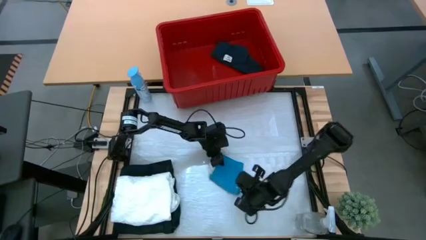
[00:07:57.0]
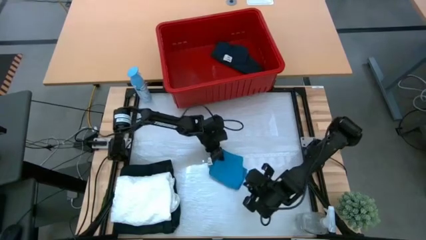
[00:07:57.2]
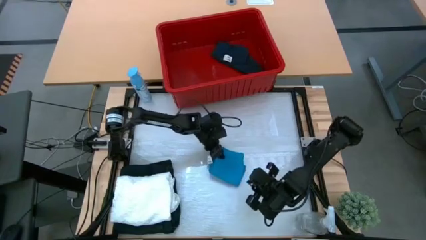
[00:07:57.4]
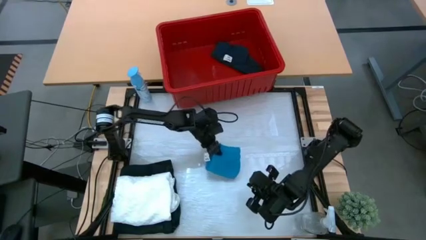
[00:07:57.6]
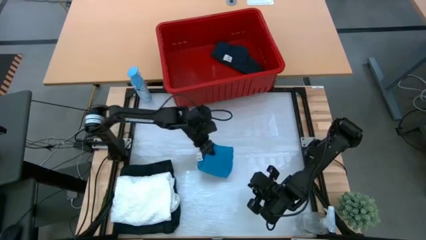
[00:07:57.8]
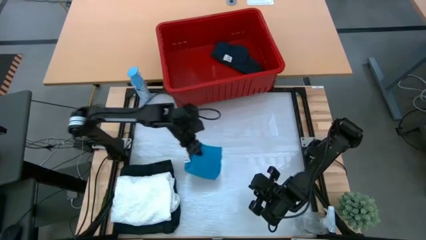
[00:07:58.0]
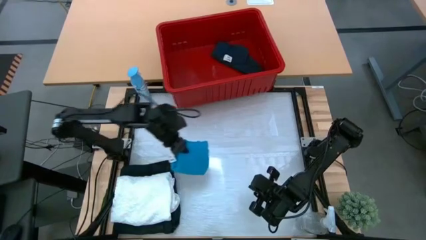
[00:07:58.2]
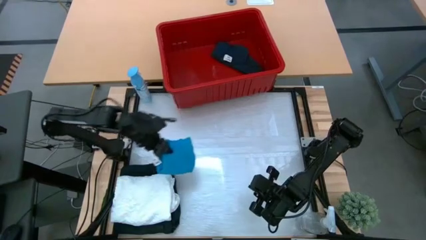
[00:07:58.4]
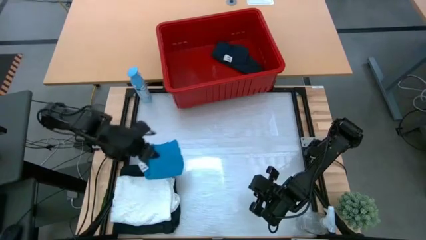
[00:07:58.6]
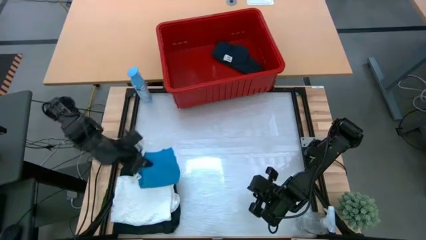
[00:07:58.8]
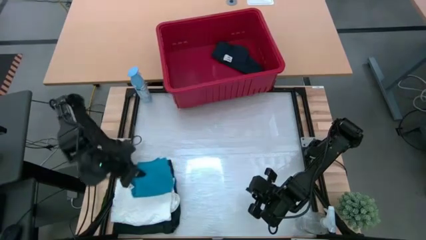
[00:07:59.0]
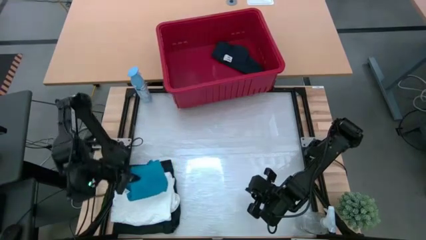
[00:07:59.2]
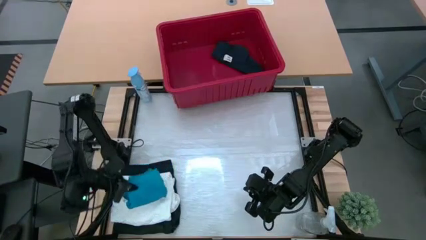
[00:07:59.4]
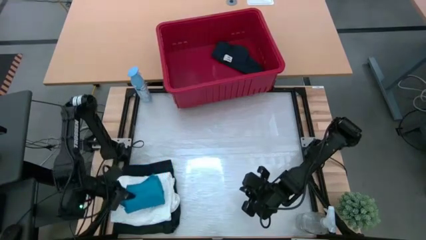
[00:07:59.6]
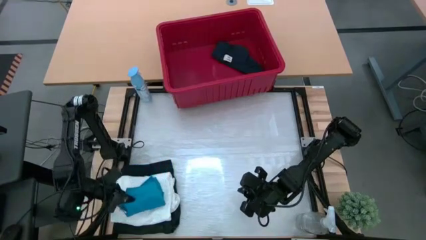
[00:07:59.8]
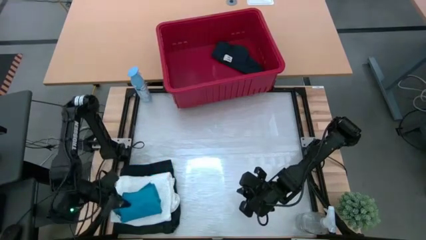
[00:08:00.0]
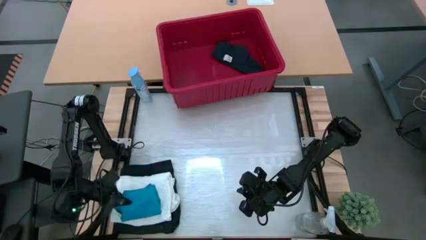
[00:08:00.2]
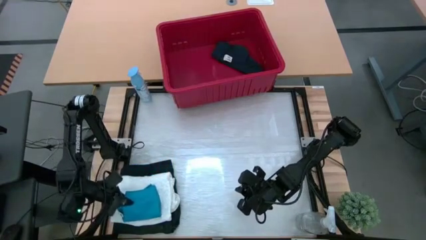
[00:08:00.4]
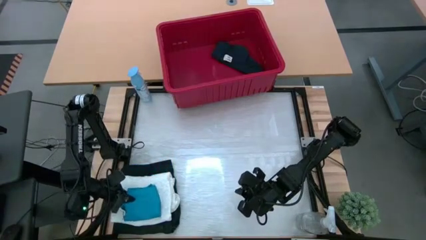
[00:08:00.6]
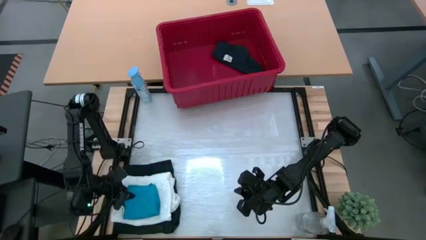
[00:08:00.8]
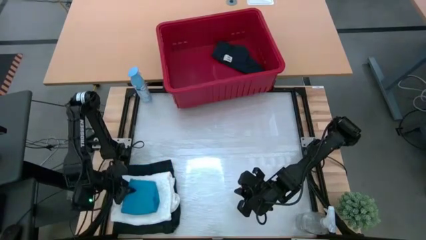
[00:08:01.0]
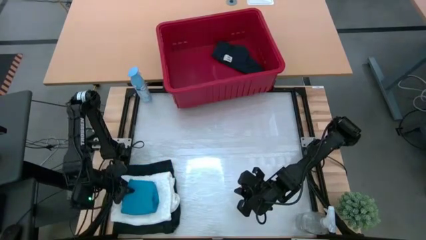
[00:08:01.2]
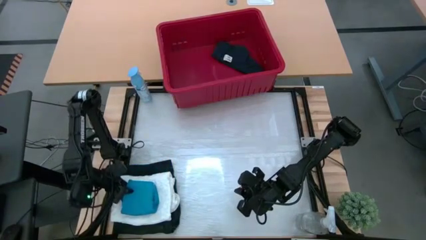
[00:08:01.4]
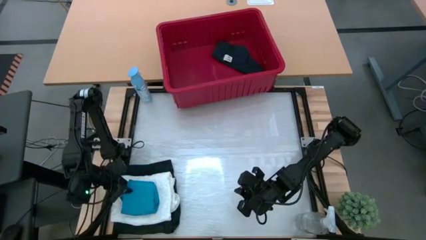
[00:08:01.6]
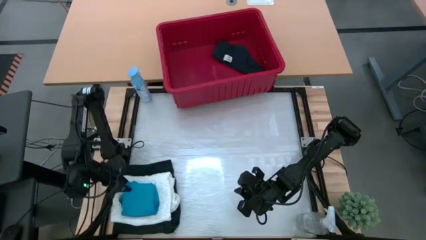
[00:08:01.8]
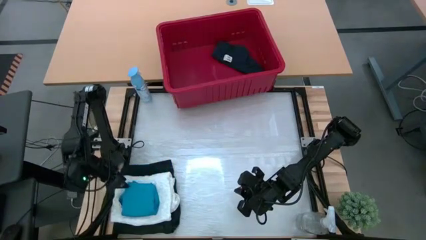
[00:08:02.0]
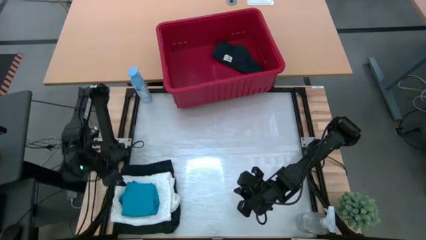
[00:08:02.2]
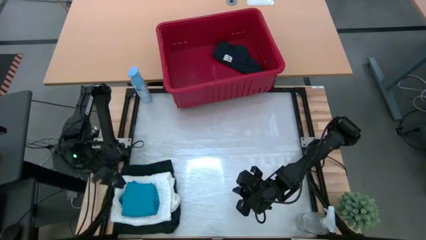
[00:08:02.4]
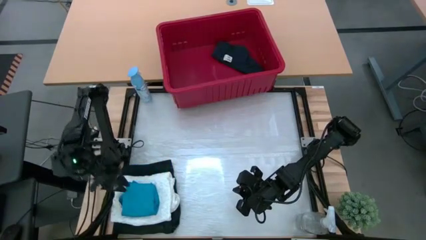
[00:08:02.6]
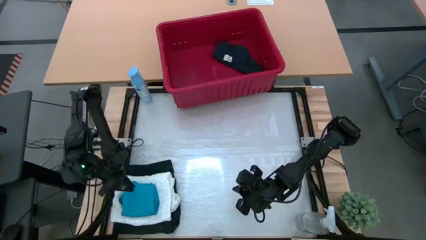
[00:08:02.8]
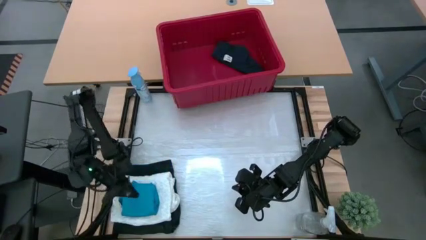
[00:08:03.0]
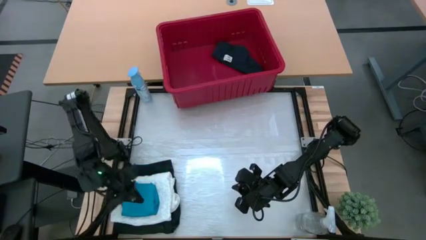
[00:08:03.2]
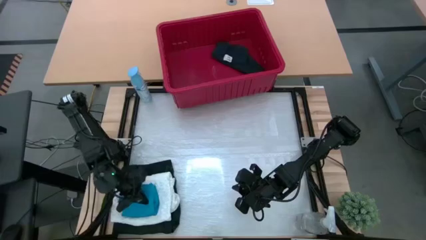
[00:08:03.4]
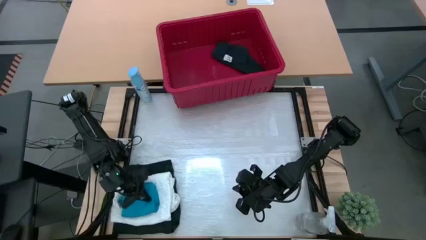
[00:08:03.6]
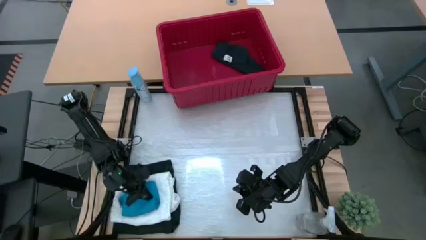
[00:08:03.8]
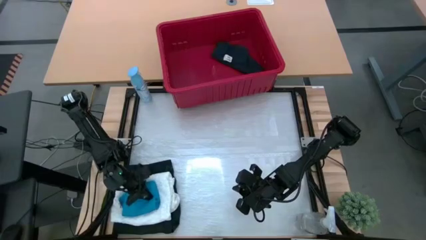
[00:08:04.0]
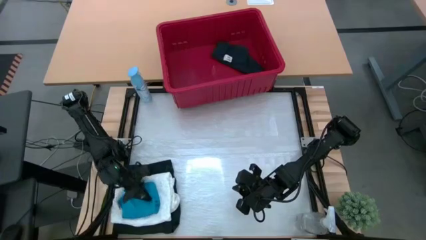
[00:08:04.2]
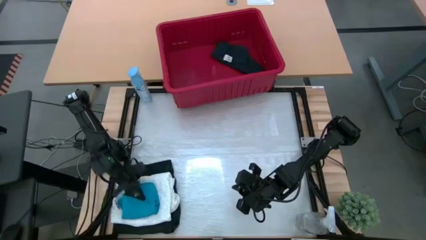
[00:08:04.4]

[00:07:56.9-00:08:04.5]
Task: Fold Laundry from Bin
Stack the blue shorts on top of the white shirt

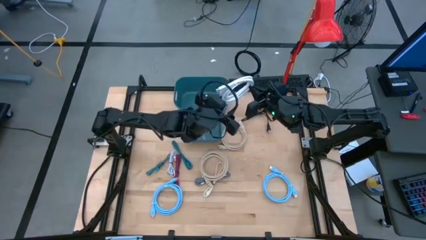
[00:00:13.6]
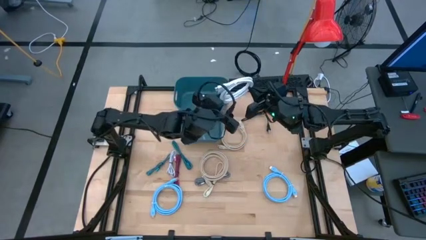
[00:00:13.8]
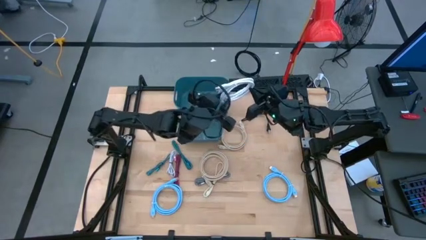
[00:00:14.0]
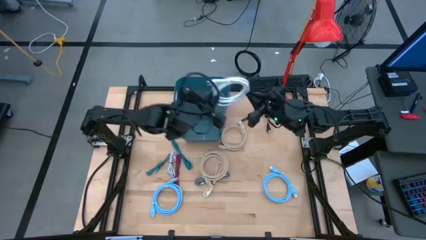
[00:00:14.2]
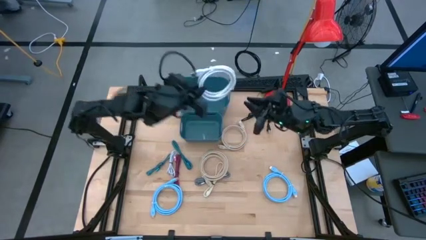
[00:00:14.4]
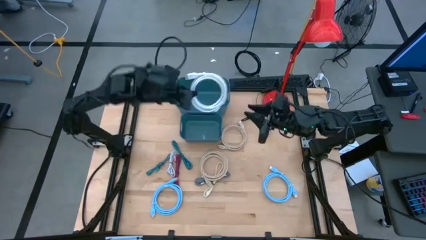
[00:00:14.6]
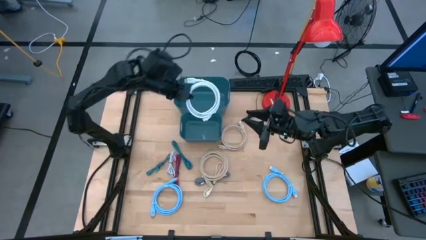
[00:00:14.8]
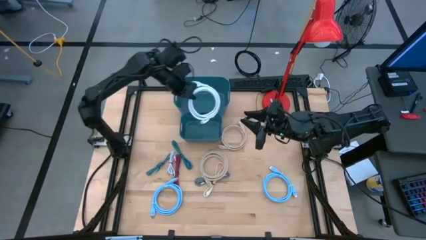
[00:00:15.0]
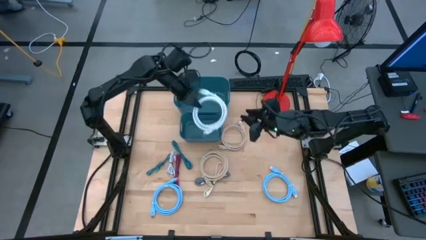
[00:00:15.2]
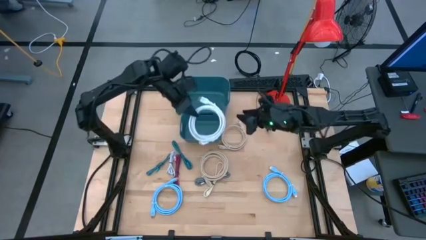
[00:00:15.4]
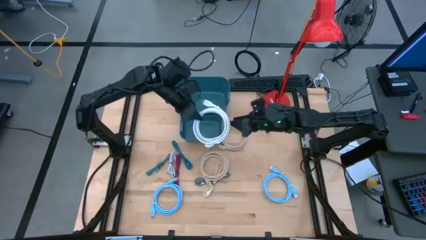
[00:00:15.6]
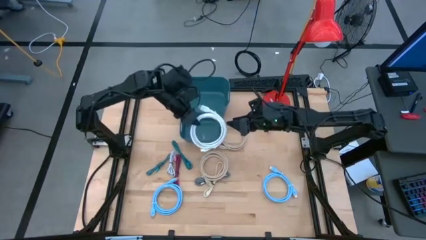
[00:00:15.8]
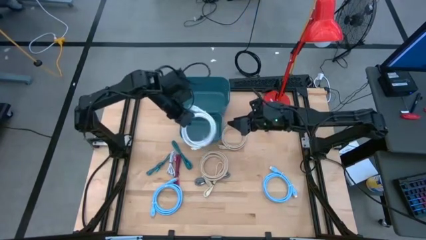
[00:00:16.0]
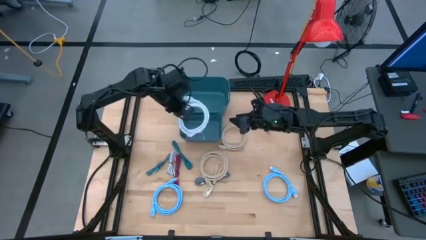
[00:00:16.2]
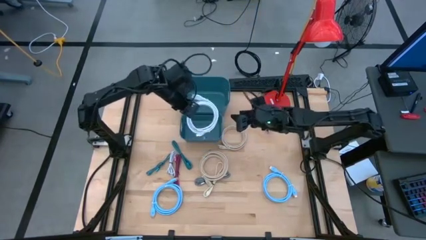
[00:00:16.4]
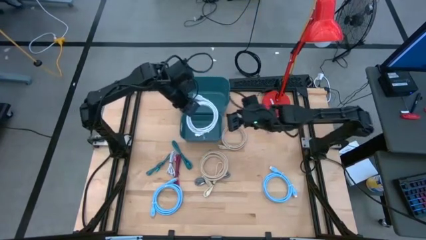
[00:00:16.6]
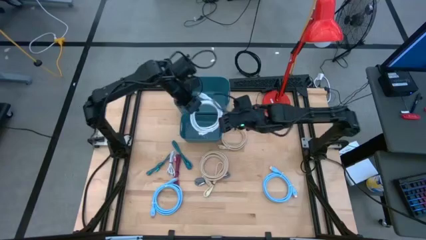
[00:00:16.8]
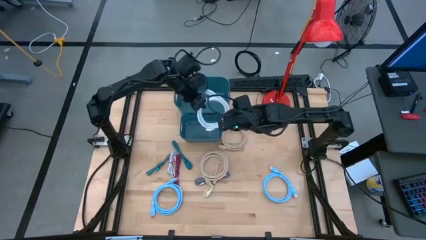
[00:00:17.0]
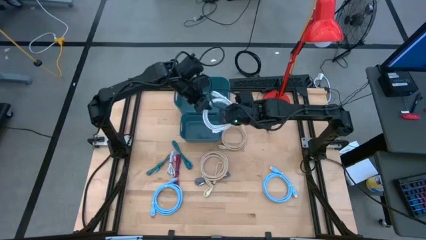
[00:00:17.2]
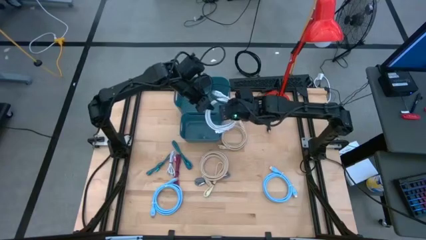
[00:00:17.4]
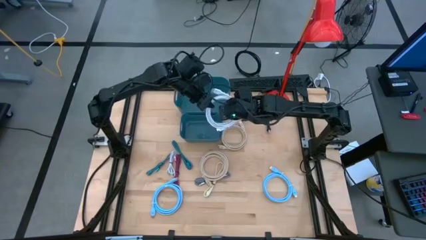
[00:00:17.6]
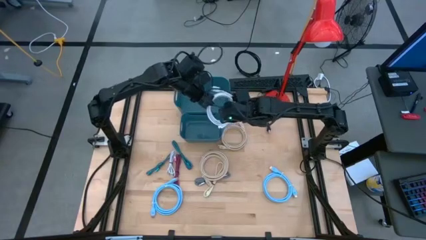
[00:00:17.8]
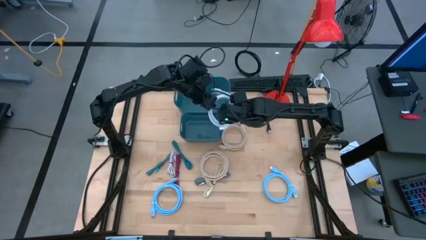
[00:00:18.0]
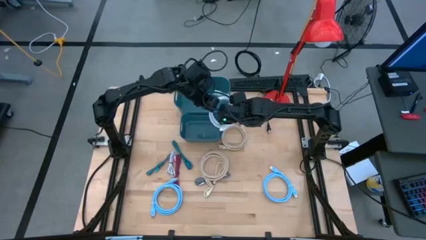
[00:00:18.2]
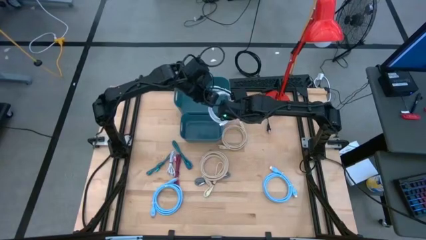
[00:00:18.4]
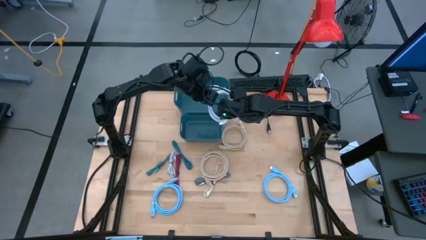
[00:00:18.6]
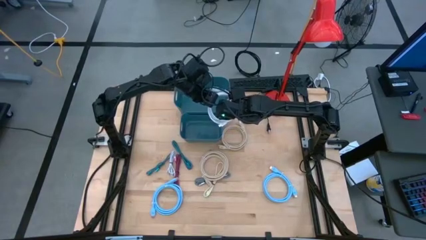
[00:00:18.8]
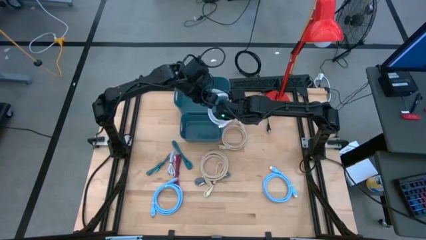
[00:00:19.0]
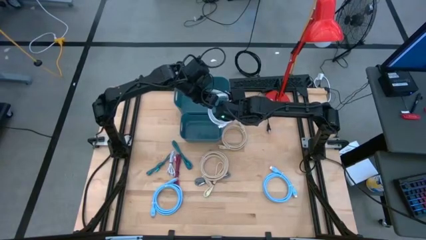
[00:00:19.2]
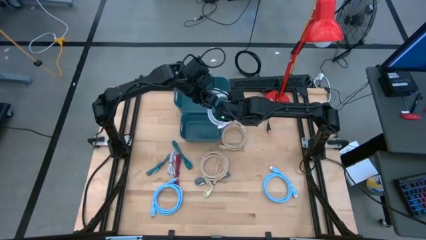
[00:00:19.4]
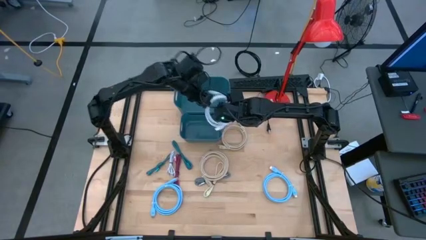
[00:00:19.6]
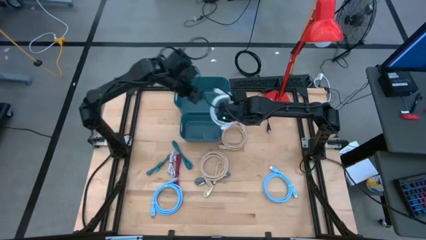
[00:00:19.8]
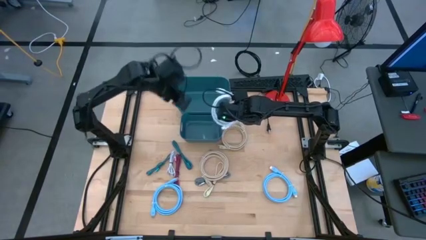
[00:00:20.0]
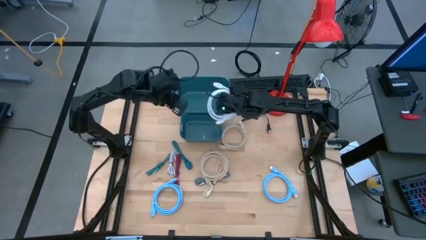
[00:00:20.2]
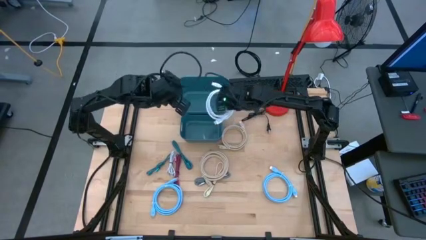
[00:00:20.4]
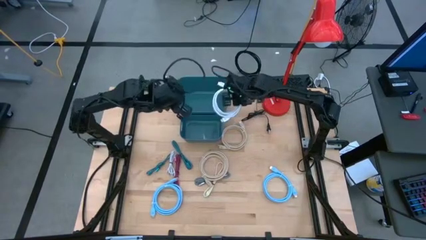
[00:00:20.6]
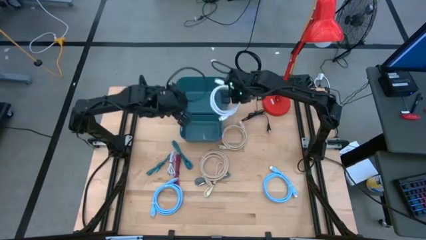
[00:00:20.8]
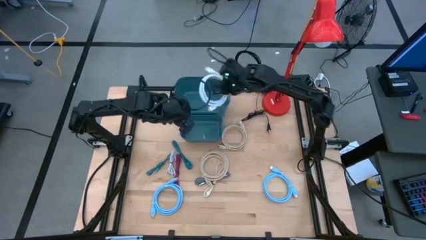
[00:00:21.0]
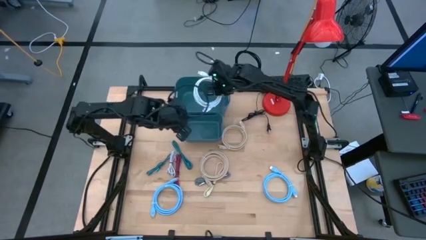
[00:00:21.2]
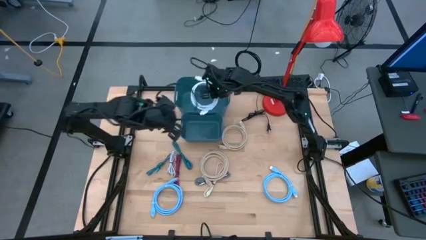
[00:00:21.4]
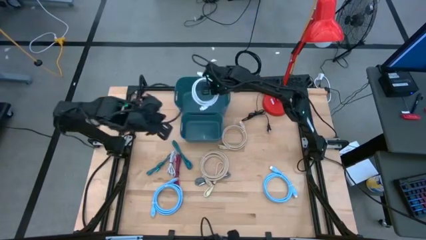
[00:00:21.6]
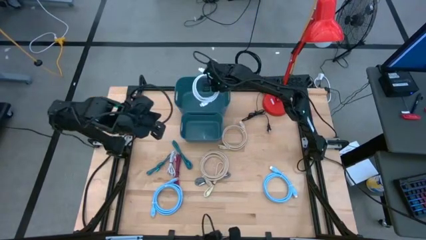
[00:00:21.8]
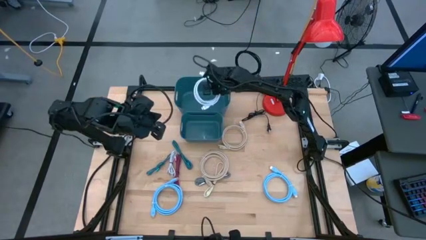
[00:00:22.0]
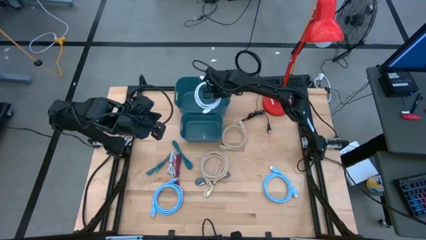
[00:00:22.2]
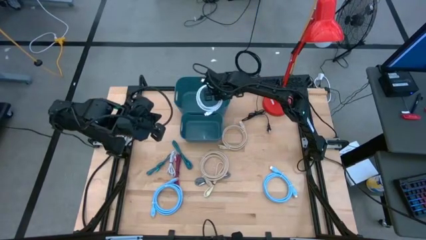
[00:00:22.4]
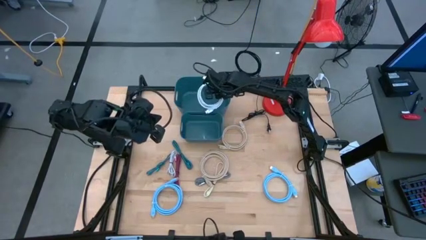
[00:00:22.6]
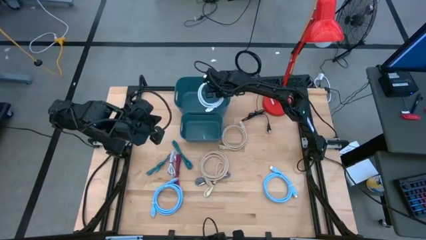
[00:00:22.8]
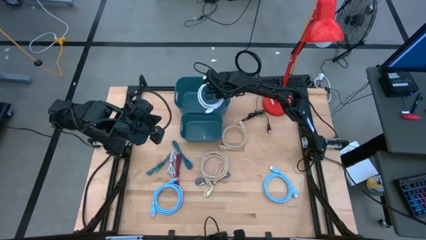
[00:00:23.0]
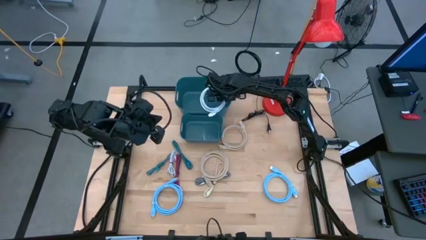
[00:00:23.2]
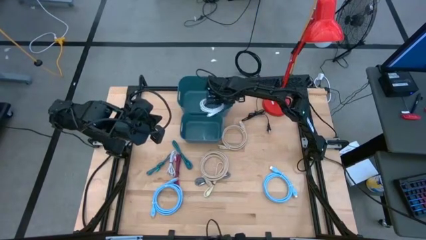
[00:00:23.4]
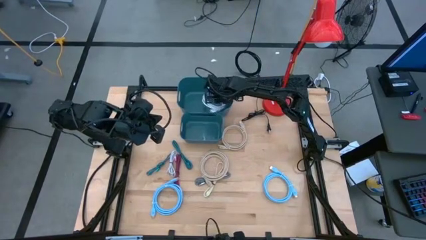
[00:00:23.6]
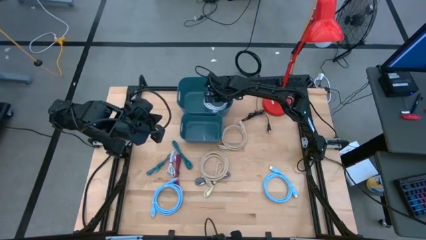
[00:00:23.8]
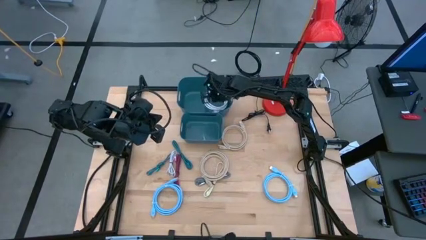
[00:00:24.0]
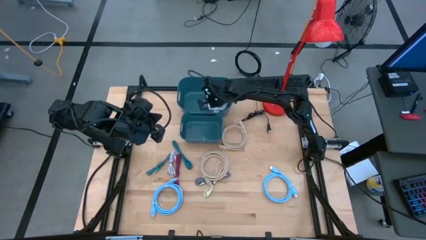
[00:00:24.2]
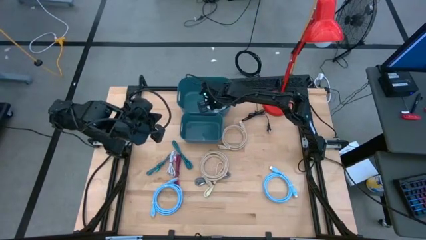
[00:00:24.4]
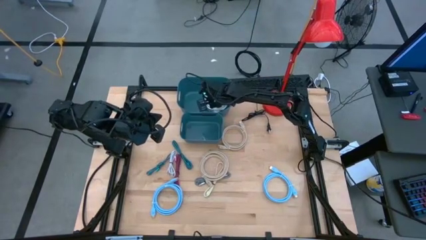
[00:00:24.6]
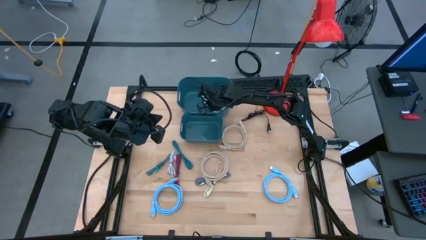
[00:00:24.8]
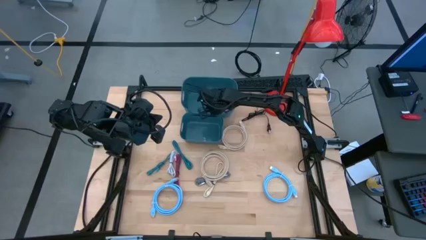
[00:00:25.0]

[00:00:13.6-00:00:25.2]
Task: Pick & Place USB Port
Put the white HDMI cable into the top blue bin
